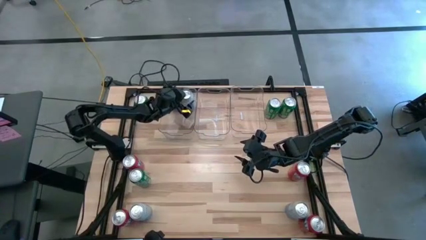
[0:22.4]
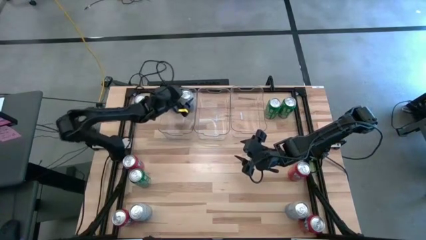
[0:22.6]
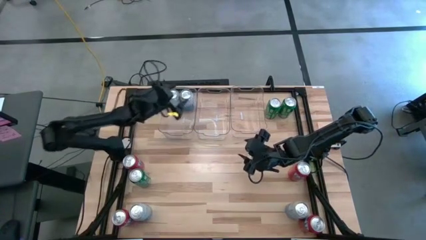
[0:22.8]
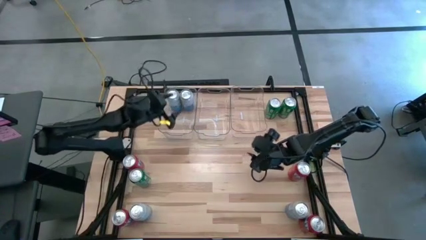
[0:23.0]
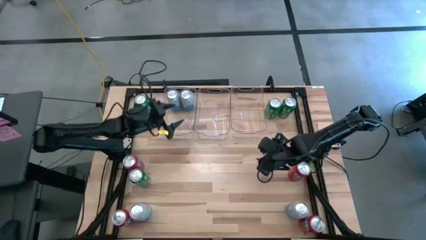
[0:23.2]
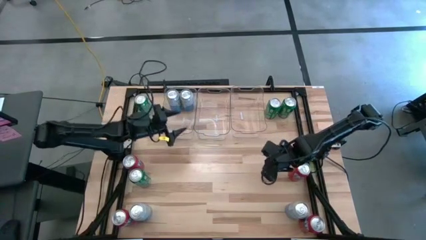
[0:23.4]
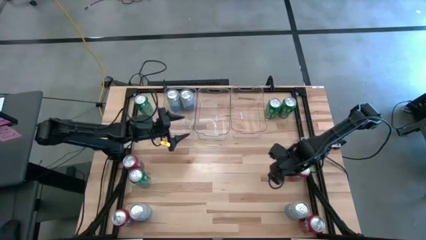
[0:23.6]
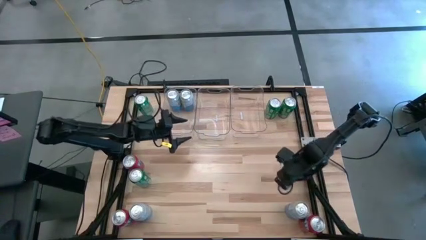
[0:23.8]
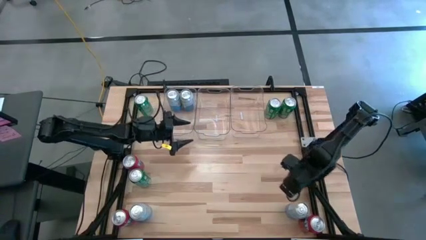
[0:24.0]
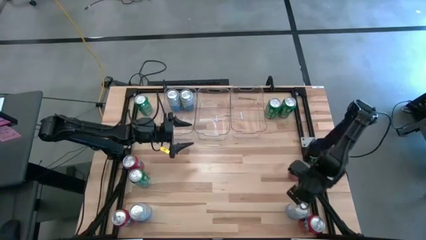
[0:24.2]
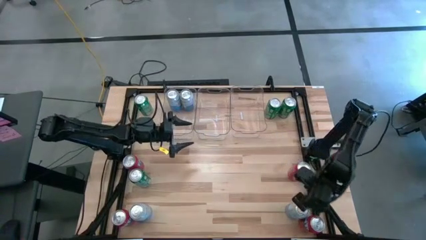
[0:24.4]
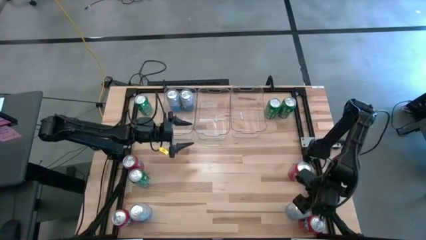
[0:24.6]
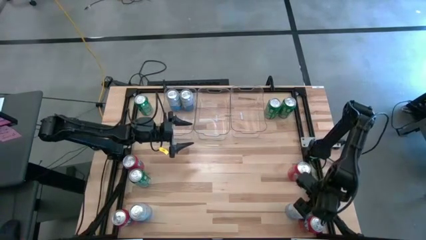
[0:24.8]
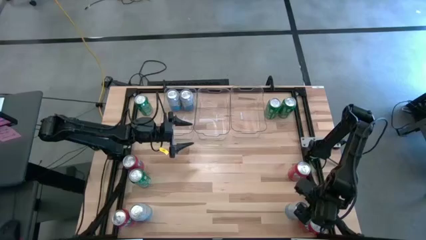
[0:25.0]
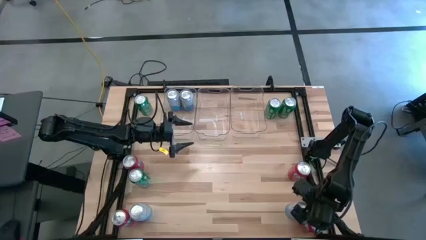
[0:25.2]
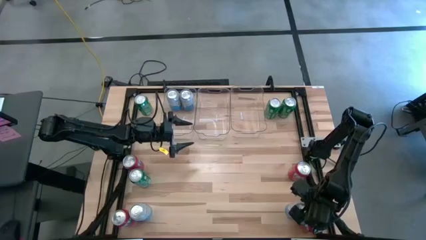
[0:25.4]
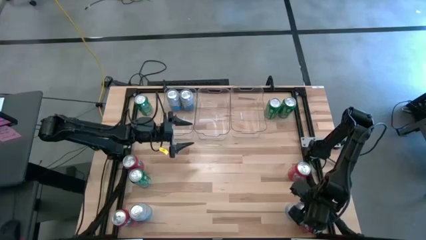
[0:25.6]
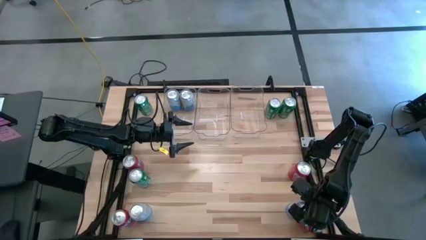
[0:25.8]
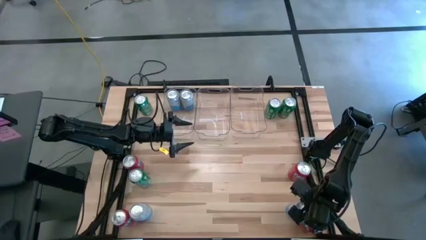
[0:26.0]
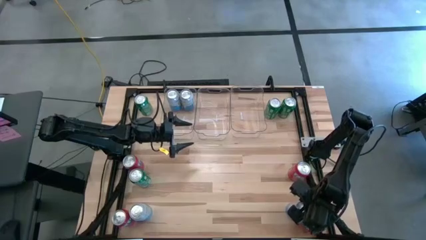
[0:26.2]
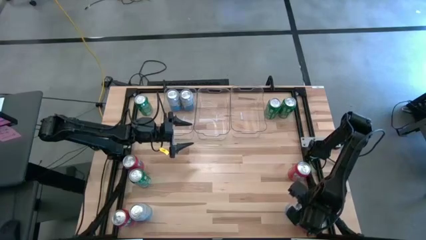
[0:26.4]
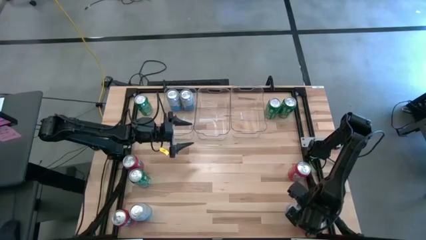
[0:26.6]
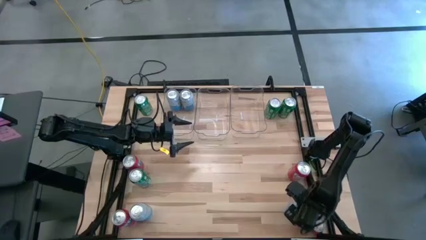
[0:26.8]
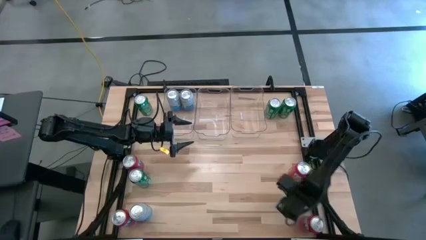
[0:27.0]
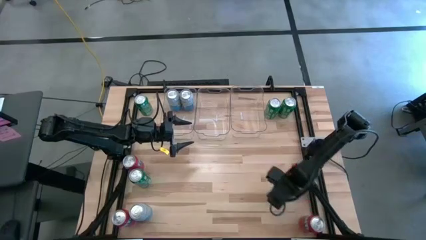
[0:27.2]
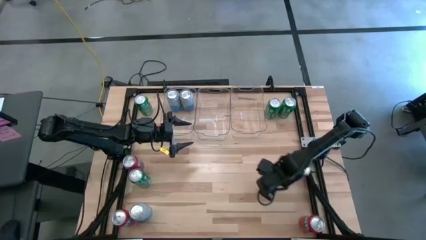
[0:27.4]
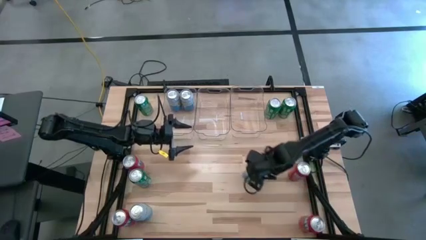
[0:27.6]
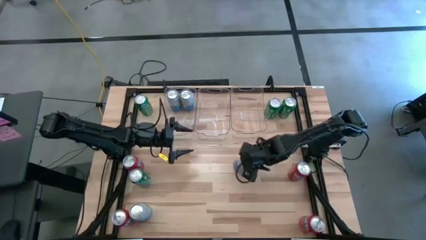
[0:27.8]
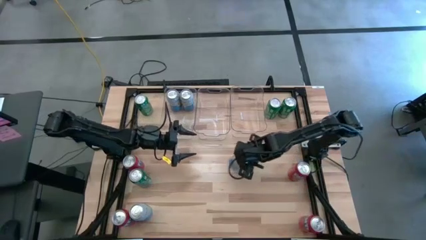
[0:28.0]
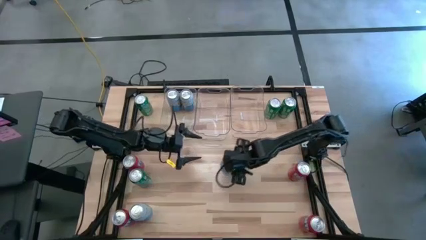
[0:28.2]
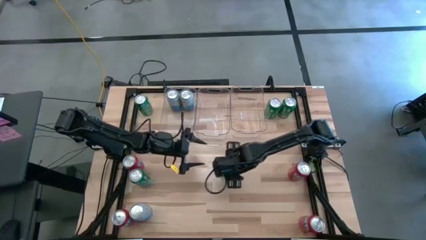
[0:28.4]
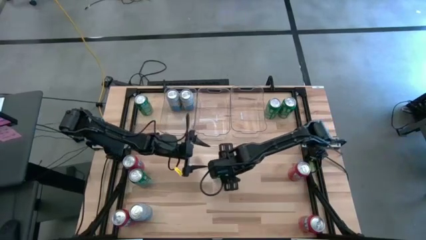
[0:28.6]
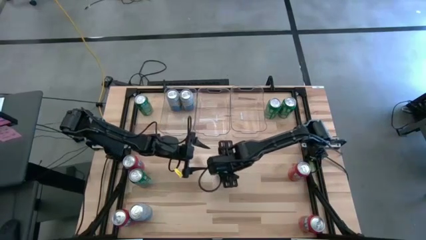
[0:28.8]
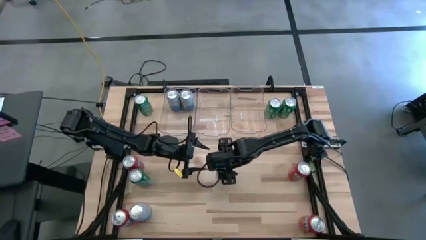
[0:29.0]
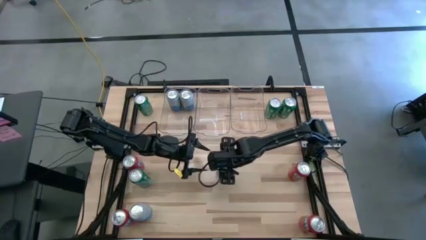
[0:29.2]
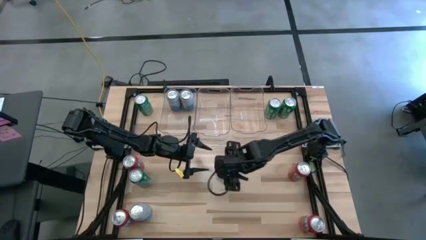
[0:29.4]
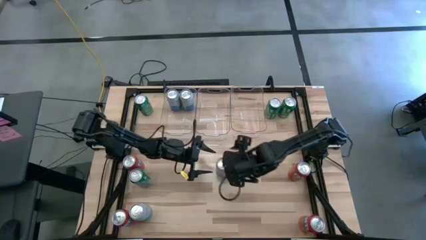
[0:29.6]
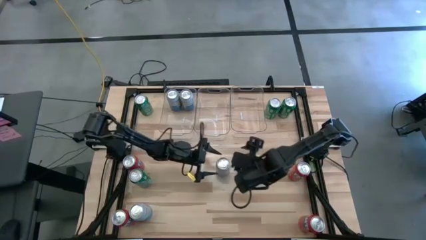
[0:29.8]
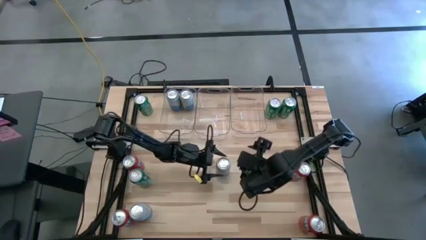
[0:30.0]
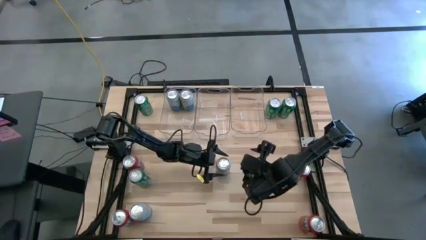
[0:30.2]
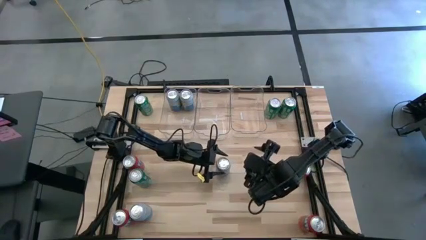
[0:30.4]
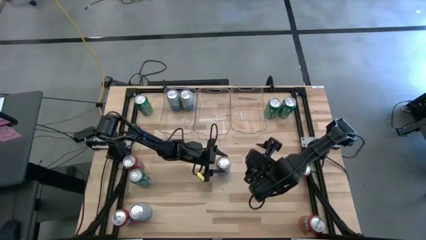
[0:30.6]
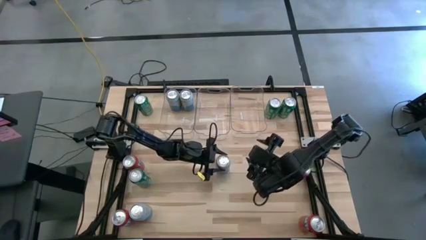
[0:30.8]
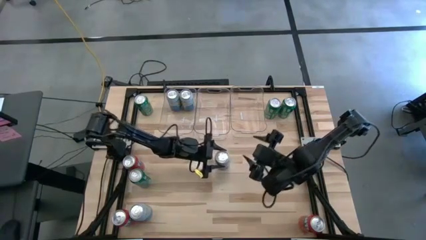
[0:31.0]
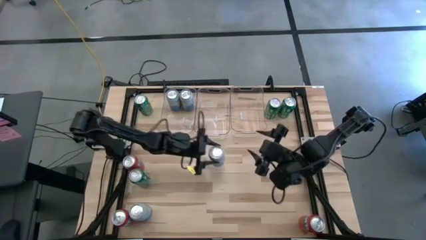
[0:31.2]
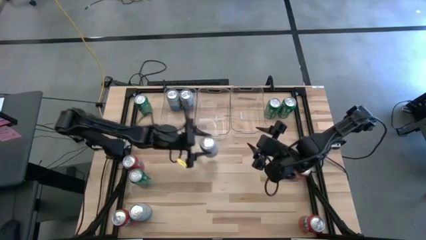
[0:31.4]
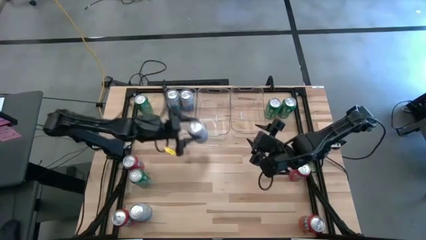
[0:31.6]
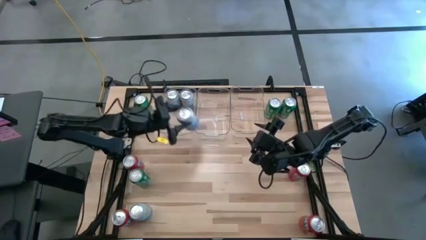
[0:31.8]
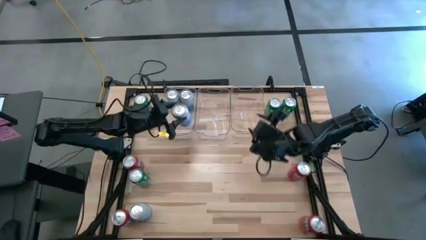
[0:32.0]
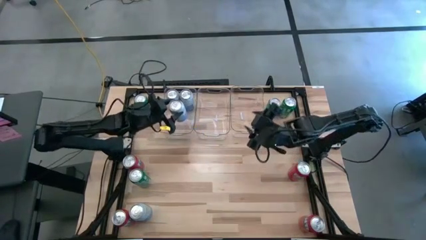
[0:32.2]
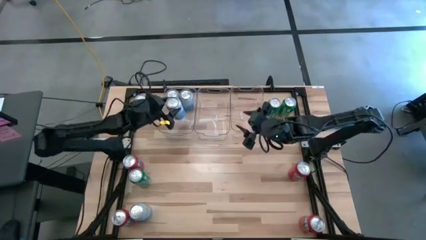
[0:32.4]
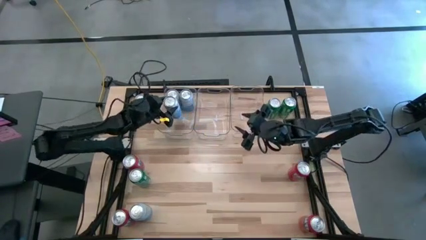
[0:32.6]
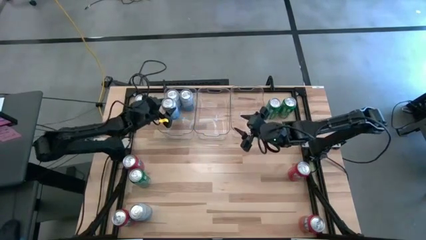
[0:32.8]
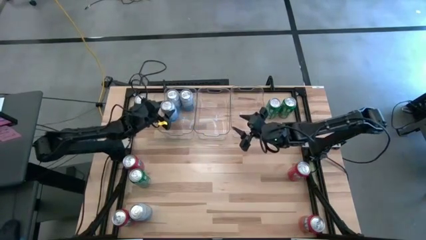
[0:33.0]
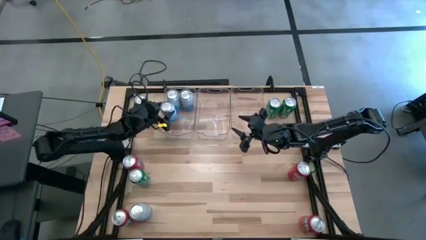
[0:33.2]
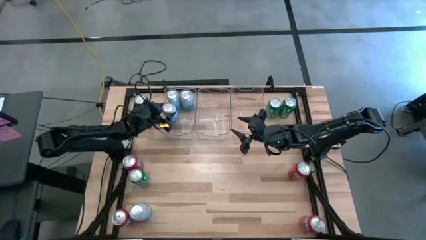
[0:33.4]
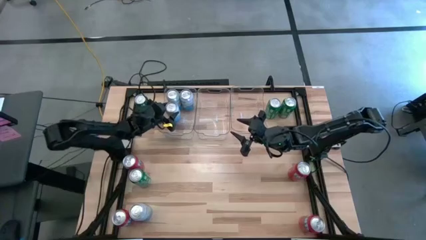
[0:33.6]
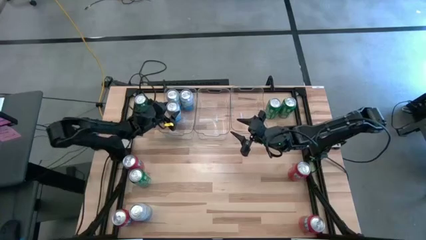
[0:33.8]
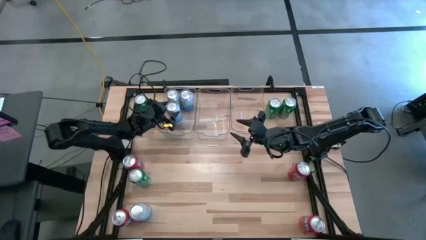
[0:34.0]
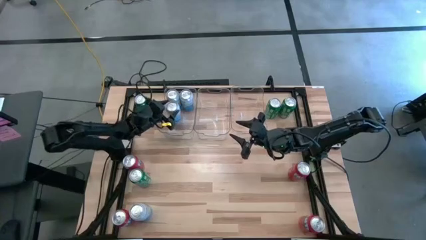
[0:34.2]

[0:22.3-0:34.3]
Task: Sort soda cans
Put the blue-white soda can into the left transparent bin

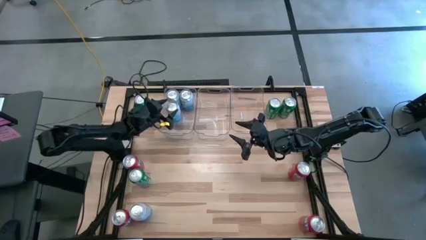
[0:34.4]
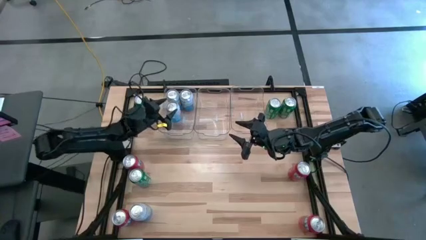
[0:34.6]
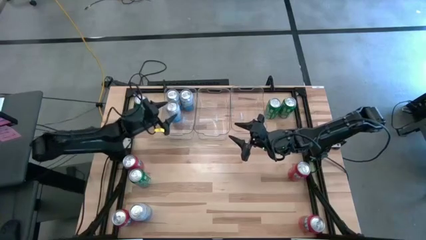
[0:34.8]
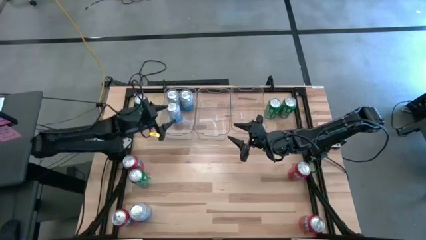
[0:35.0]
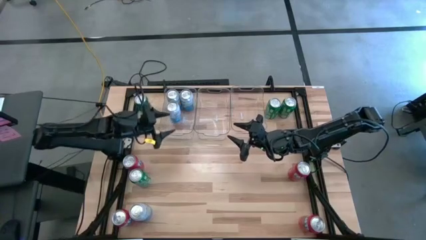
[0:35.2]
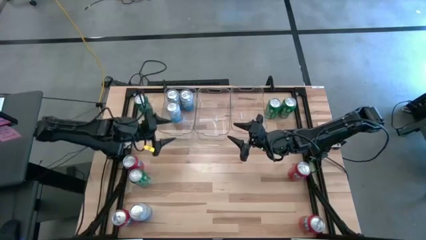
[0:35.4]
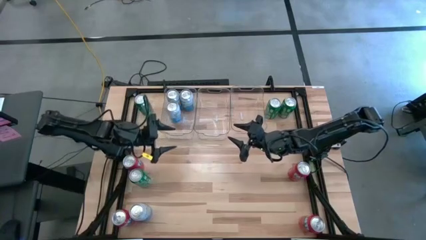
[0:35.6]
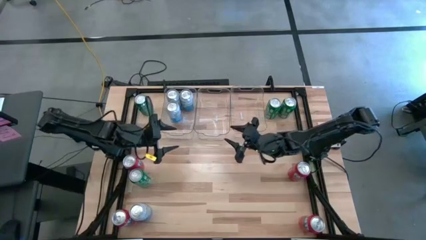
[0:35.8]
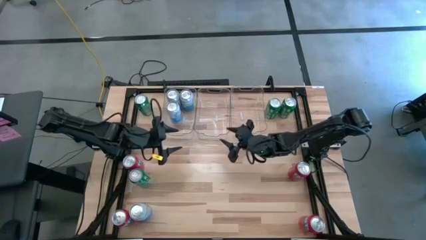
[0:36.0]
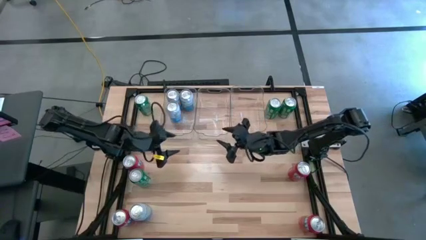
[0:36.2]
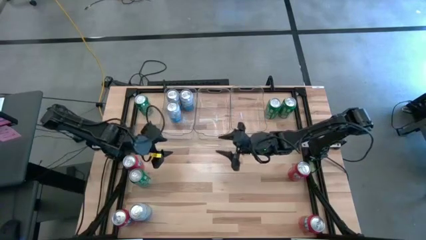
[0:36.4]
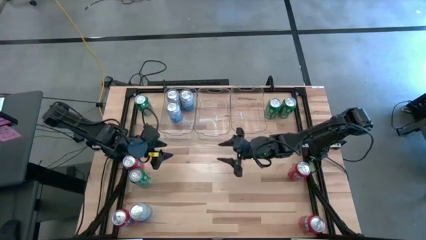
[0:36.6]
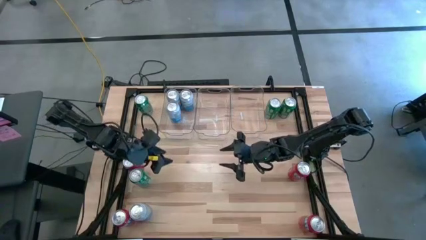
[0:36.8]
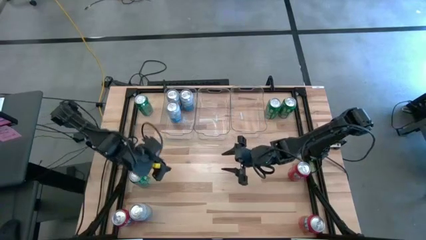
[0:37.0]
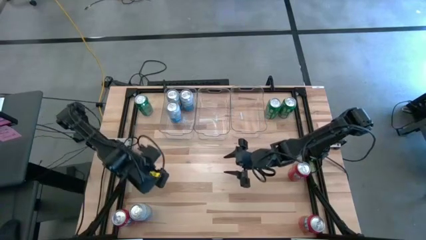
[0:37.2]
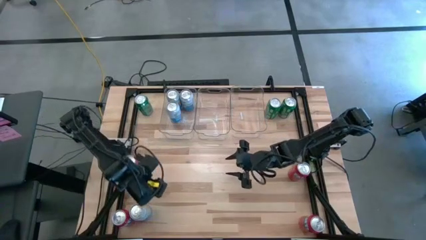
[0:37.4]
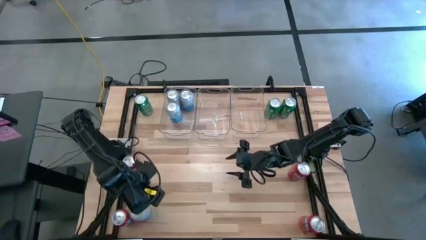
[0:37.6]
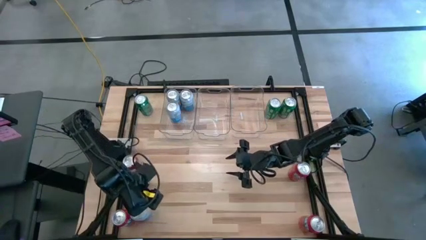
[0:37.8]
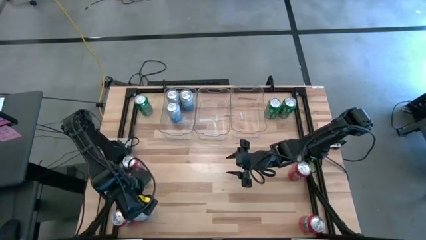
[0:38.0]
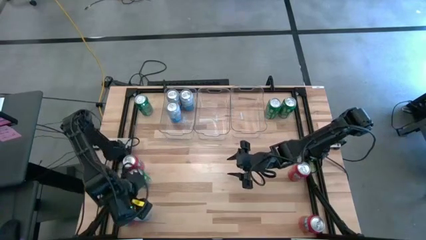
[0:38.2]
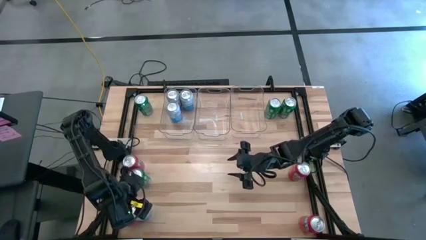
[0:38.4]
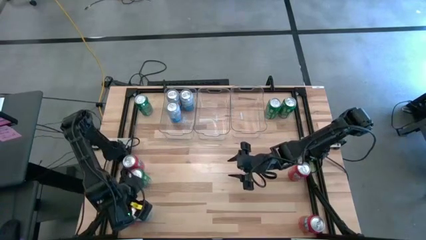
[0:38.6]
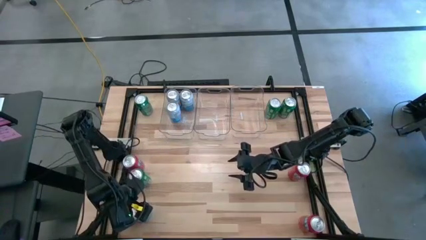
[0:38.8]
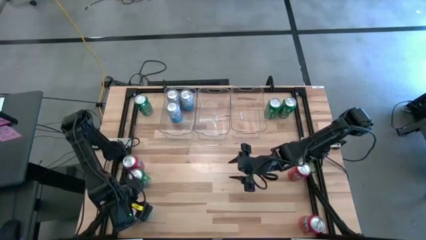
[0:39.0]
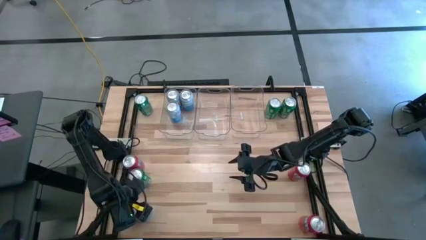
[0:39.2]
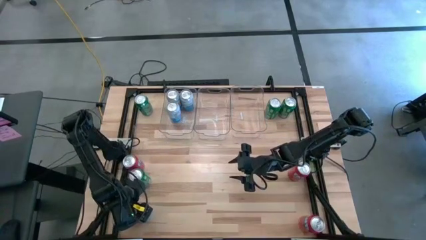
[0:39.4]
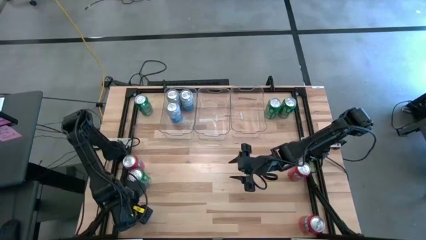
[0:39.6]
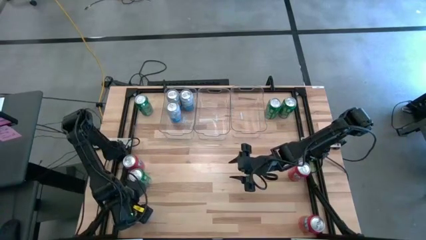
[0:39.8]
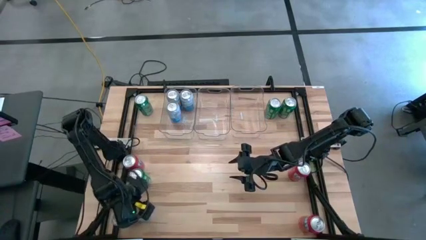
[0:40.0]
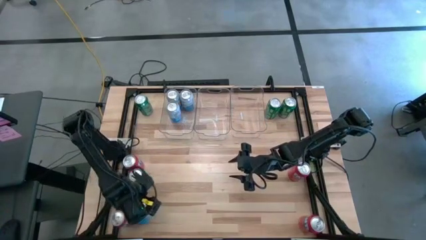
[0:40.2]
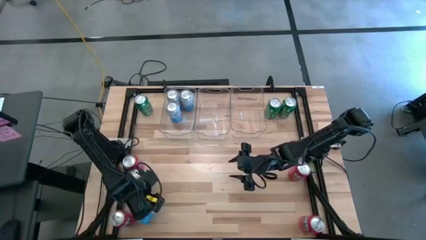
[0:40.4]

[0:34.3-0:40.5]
Put the blue-white soda can into the left transparent bin
